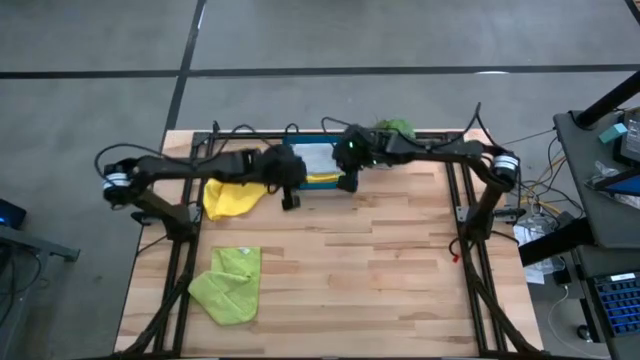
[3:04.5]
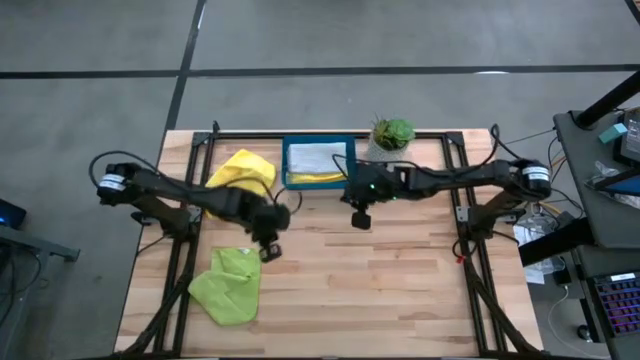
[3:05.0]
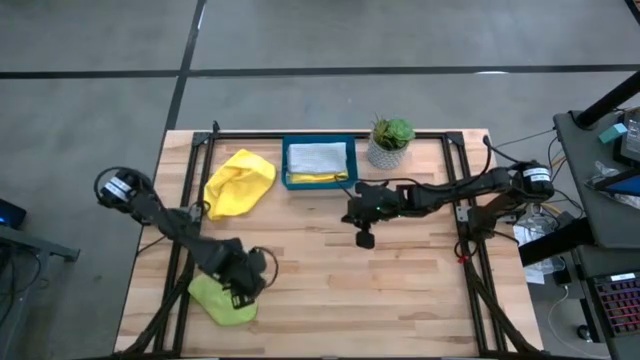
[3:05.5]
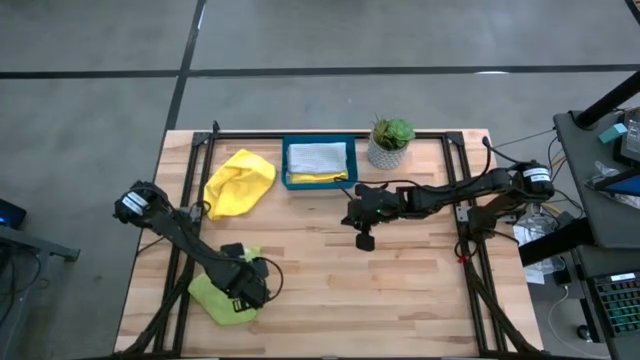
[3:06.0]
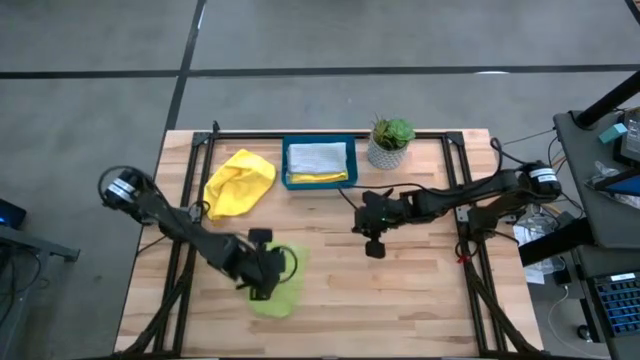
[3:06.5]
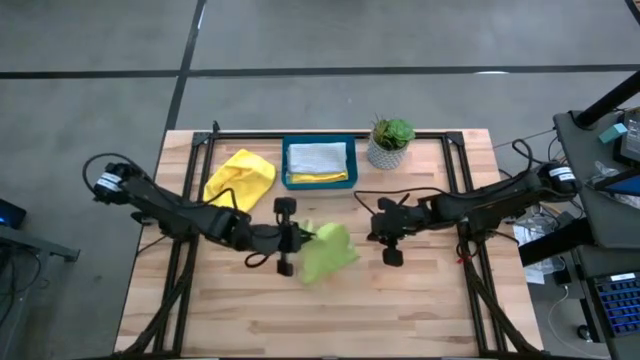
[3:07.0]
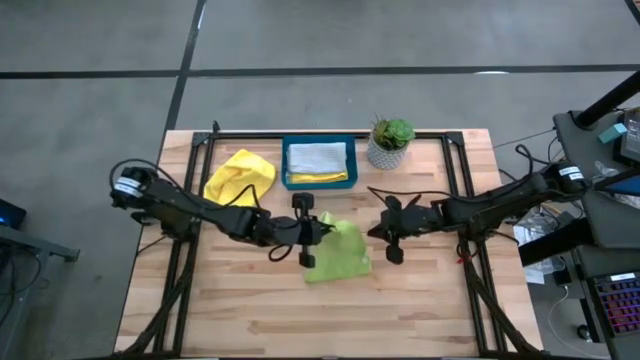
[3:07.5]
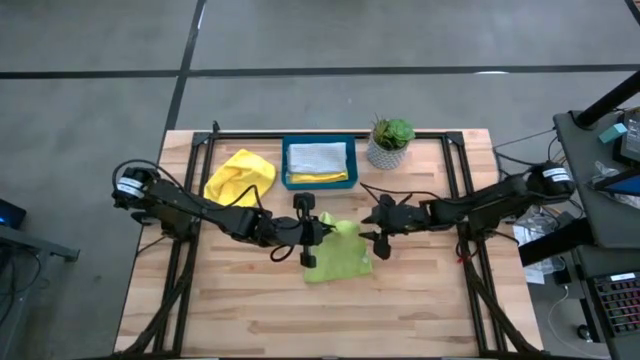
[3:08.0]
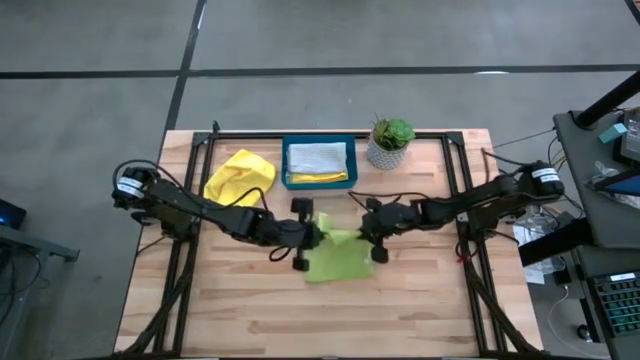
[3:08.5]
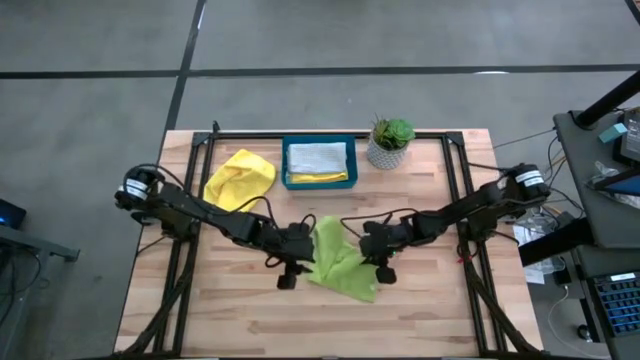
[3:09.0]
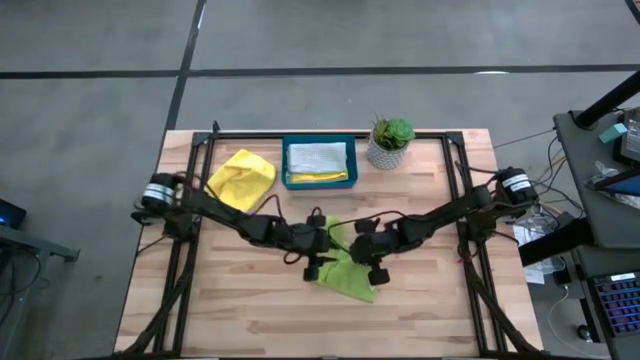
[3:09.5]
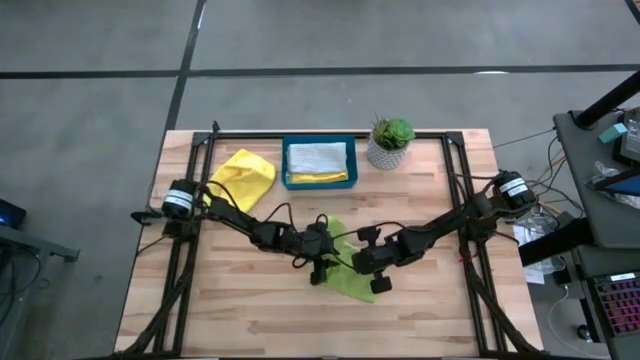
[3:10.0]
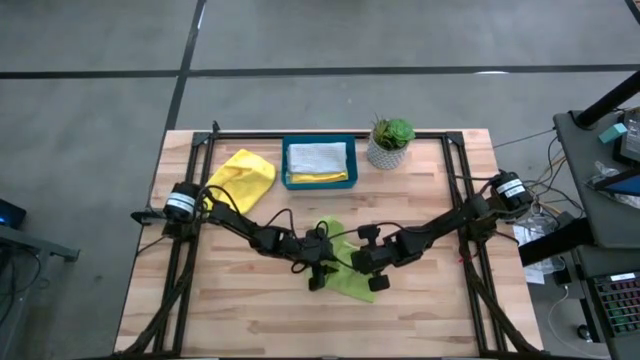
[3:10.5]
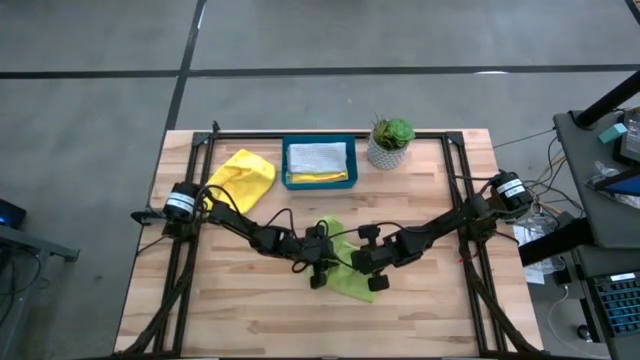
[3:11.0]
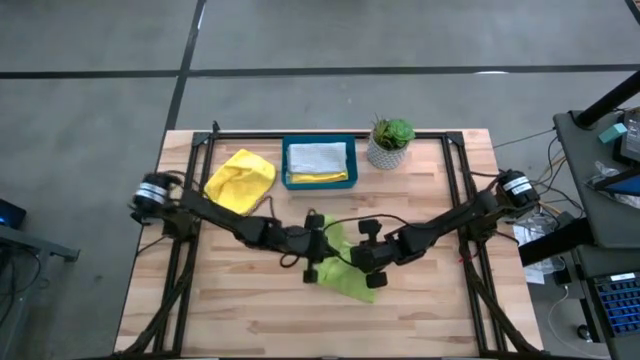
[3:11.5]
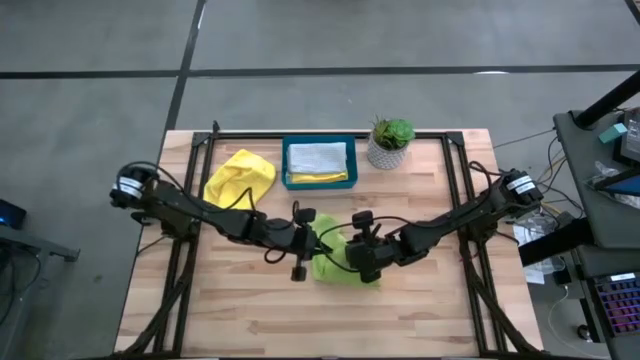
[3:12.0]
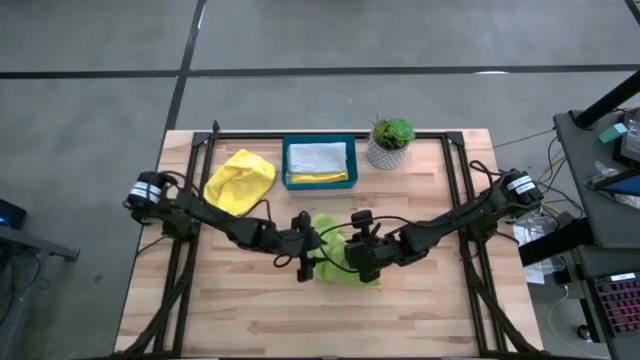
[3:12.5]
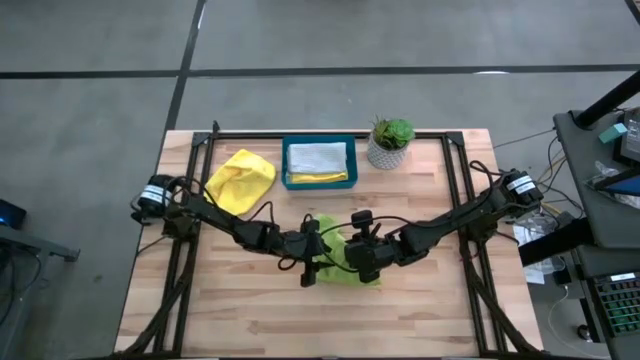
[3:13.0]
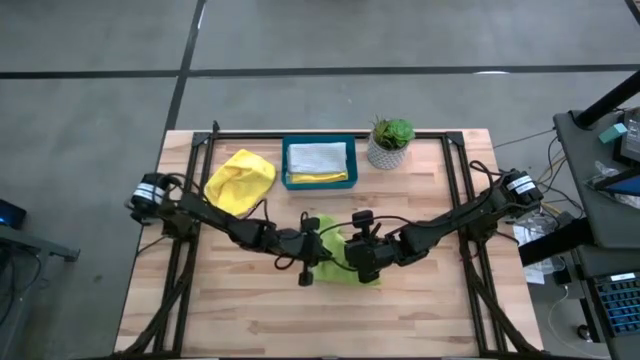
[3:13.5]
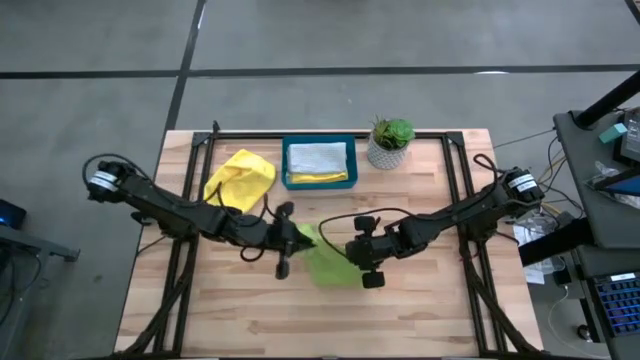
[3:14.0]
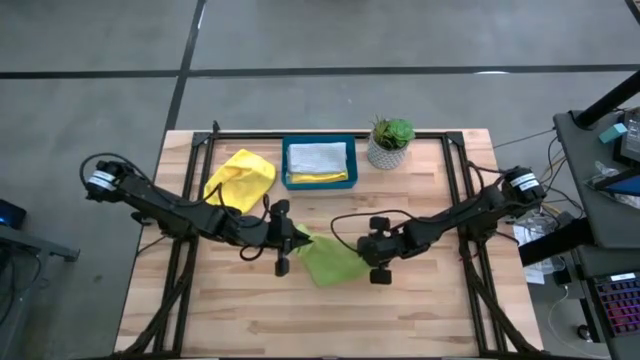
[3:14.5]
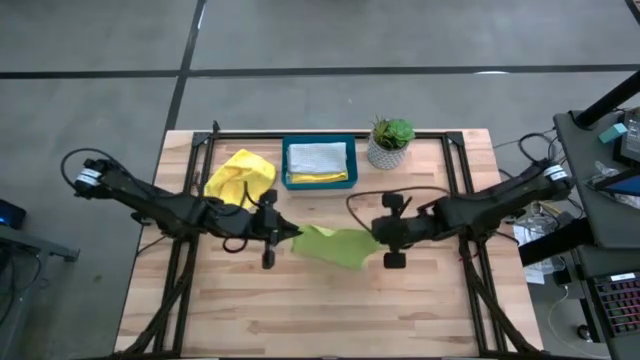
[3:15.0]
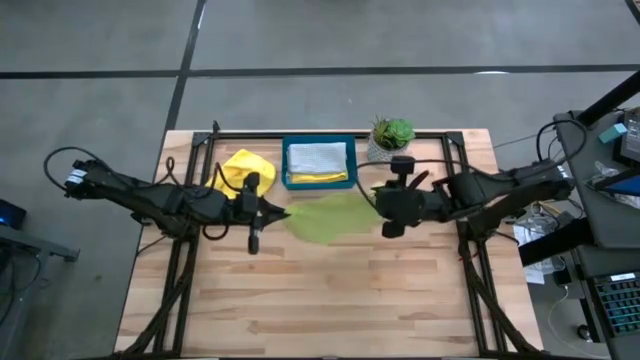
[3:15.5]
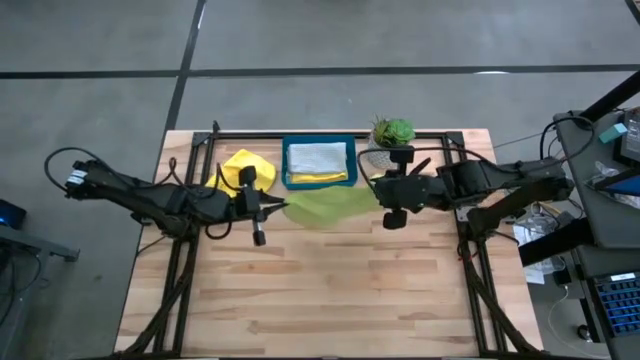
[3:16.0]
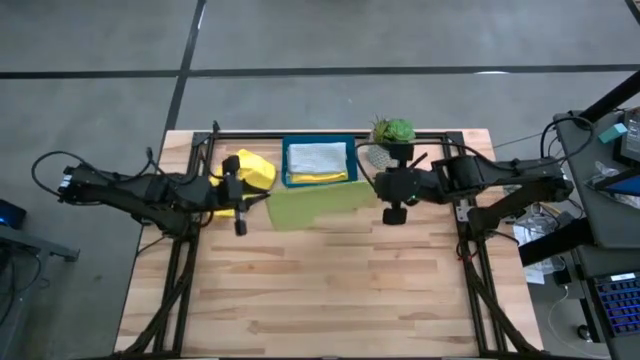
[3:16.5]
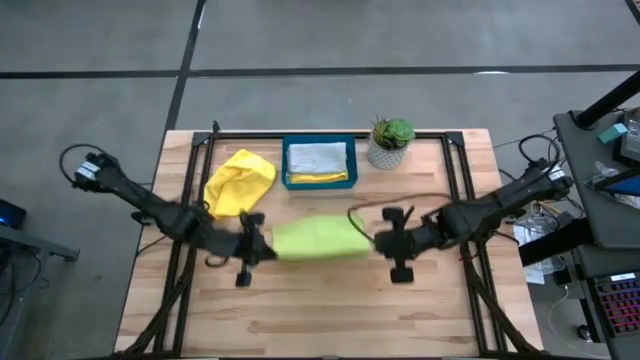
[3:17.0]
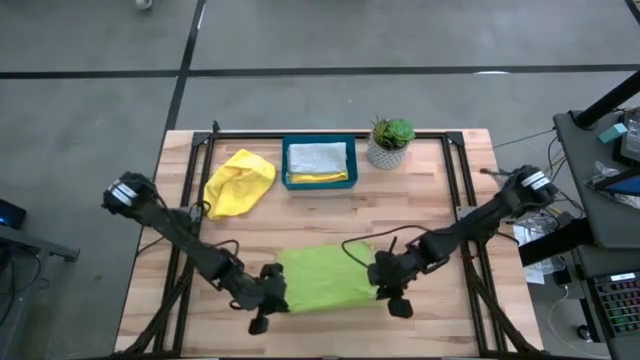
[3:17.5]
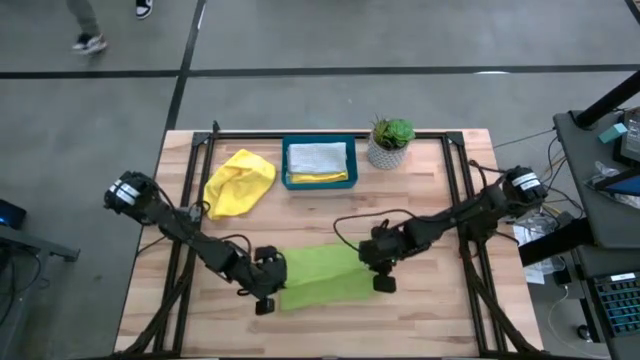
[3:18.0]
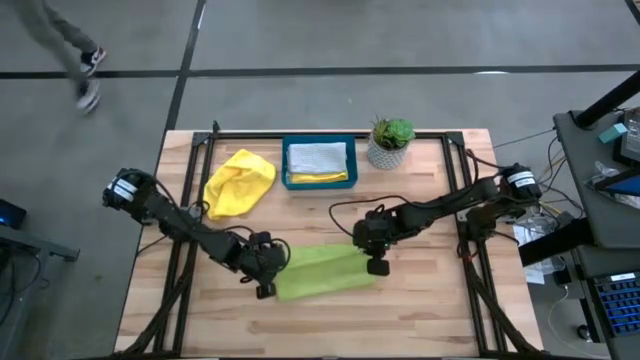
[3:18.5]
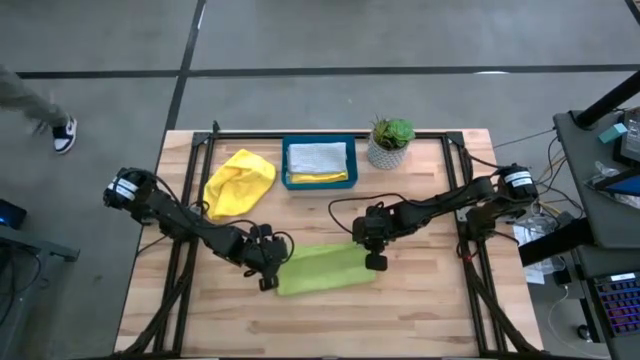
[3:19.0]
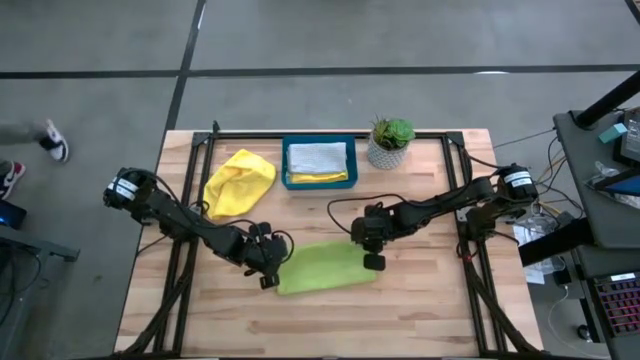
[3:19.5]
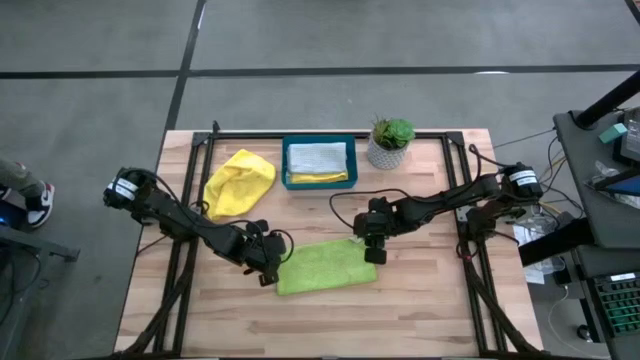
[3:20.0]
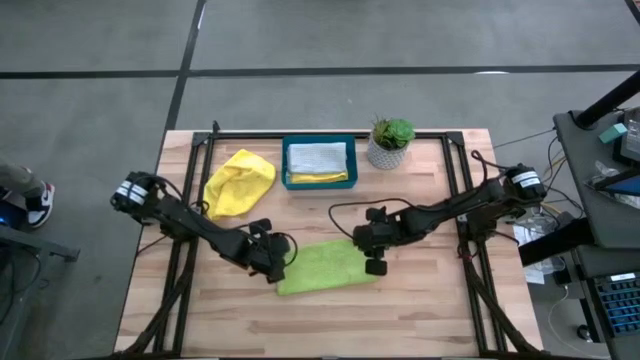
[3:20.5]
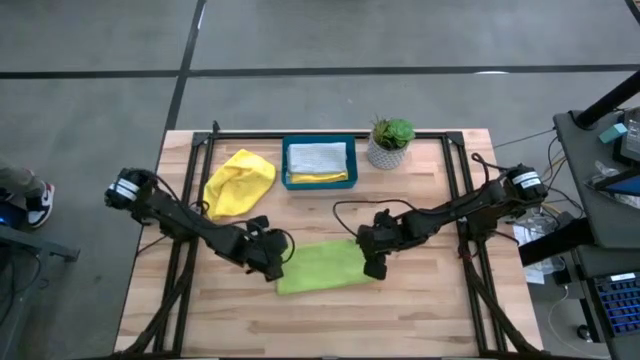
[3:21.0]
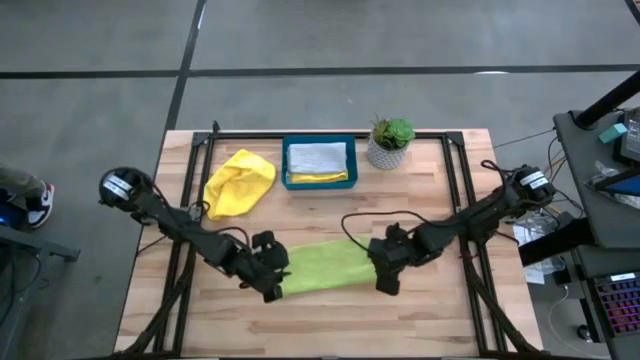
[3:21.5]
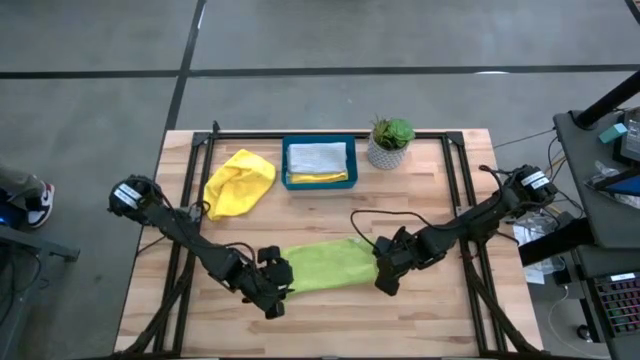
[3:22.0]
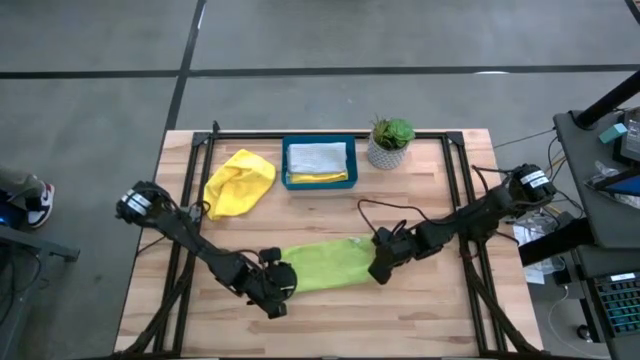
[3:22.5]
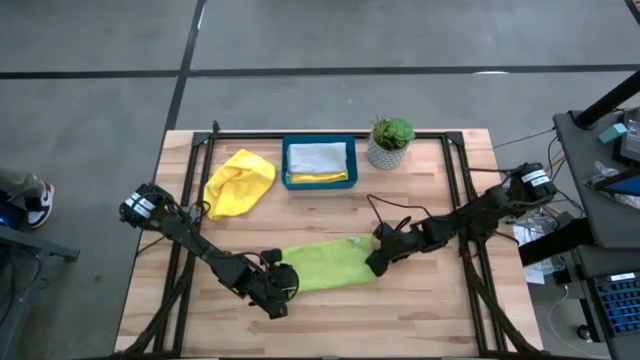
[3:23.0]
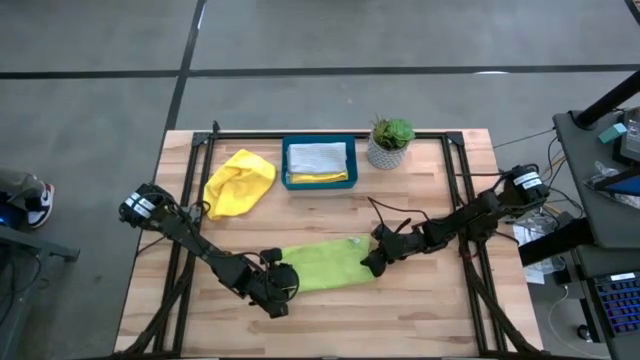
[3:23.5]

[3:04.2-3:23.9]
Task: Fold microfiber towels
Fold the green microfiber cloth

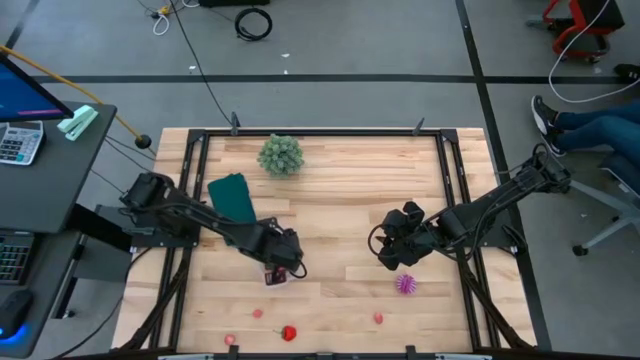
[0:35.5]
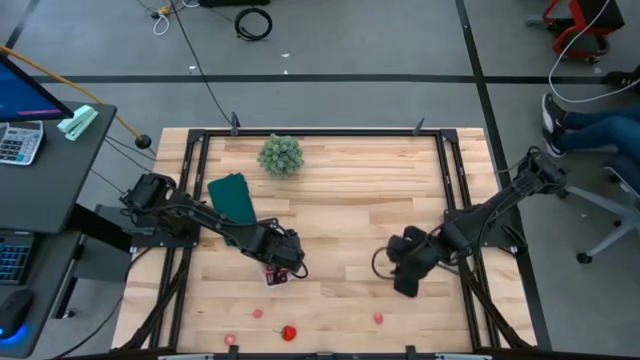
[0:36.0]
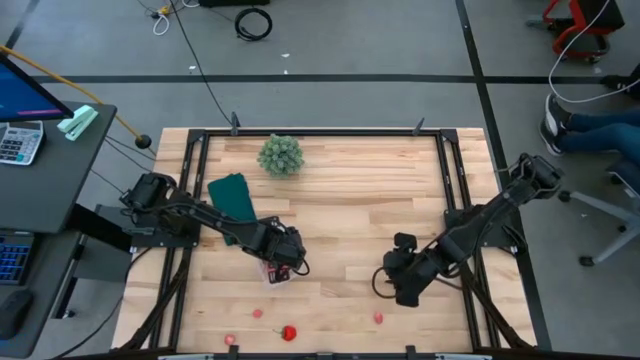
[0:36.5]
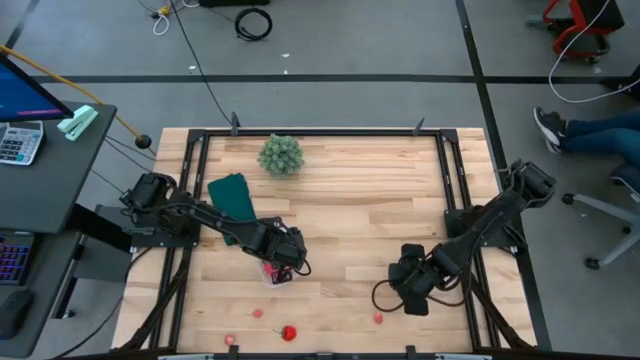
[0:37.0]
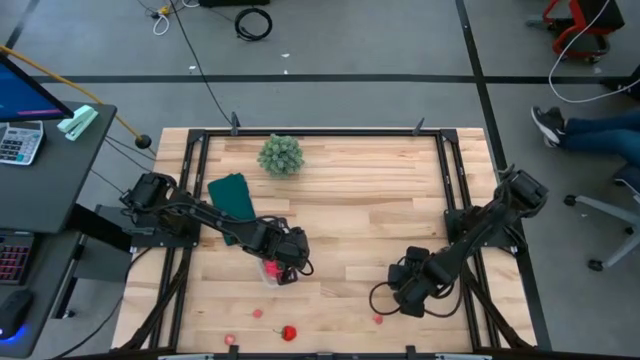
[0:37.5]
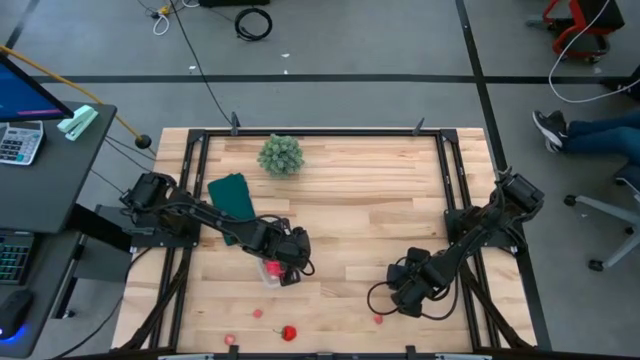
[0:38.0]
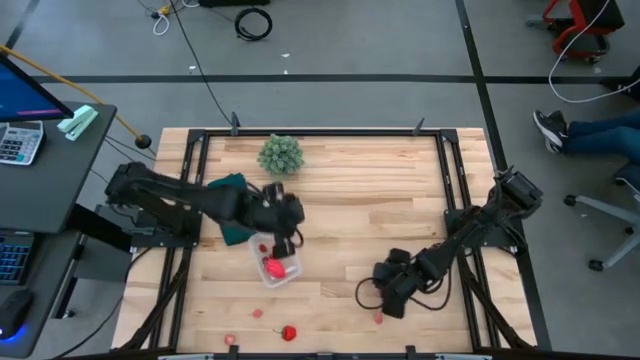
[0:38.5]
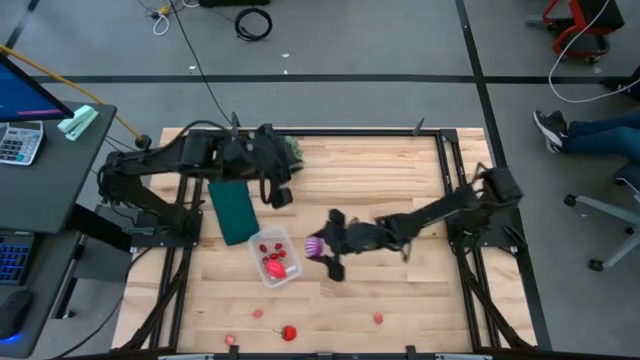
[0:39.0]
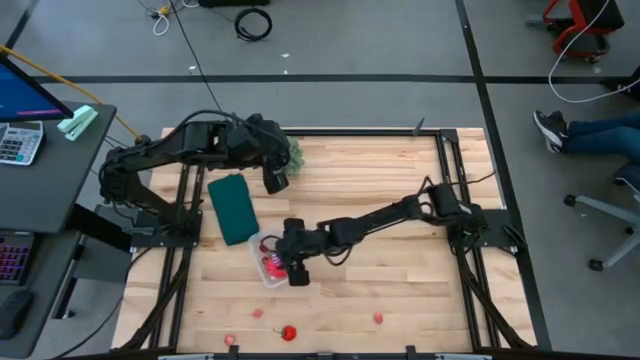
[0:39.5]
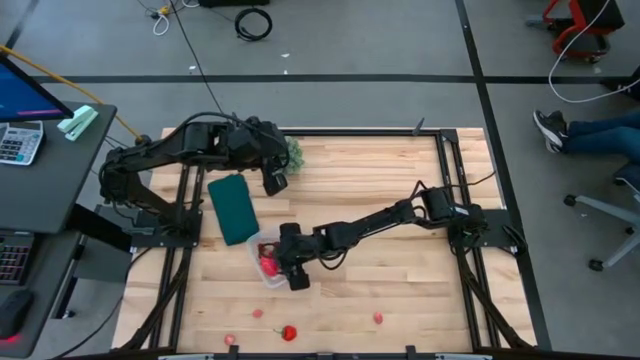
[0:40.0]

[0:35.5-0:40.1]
Task: Pick and placing Produce into tupperware
Put the violet onion into the transparent bin
